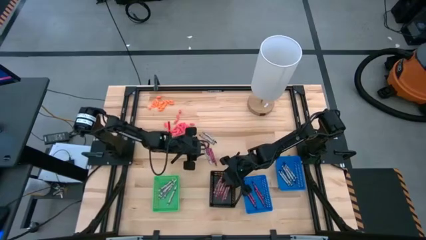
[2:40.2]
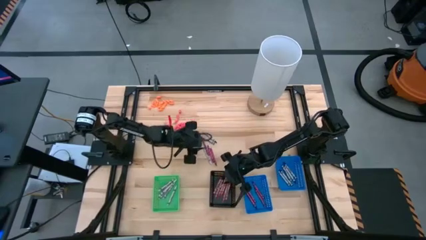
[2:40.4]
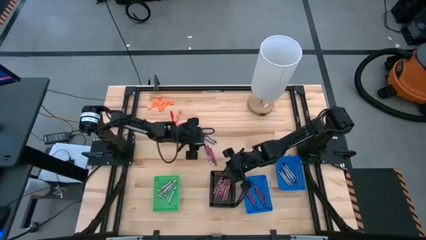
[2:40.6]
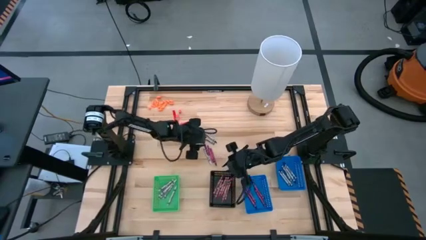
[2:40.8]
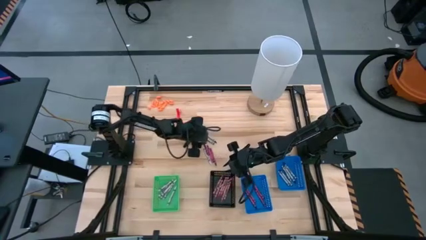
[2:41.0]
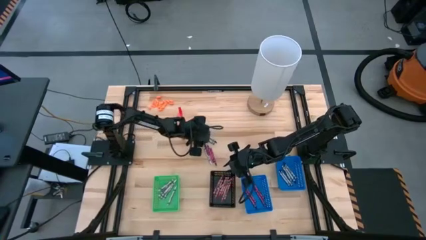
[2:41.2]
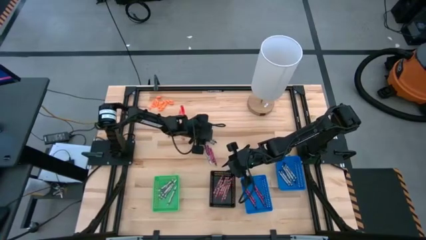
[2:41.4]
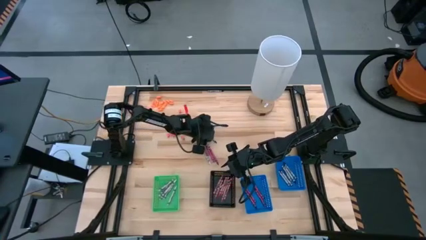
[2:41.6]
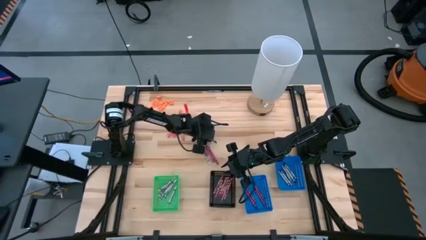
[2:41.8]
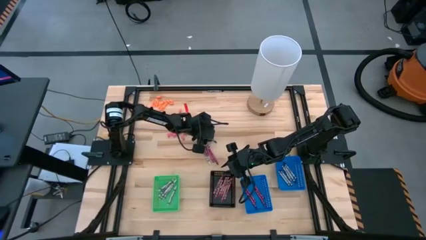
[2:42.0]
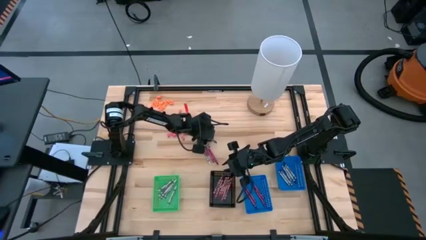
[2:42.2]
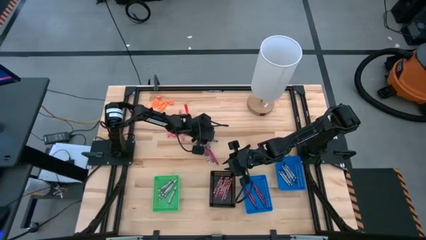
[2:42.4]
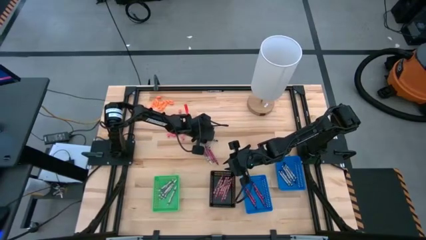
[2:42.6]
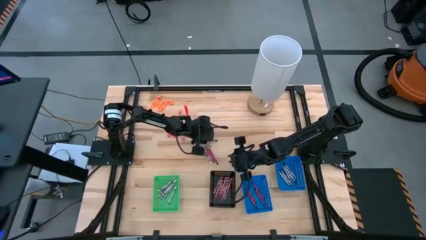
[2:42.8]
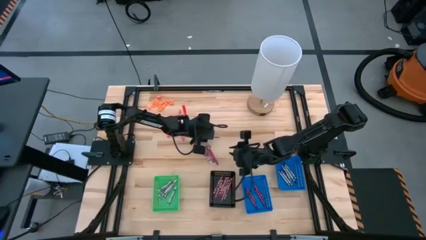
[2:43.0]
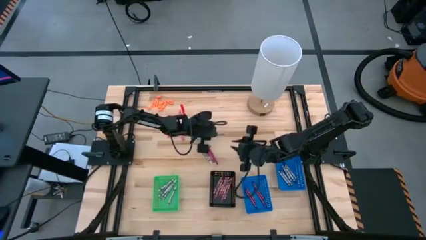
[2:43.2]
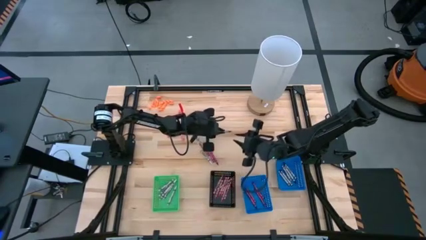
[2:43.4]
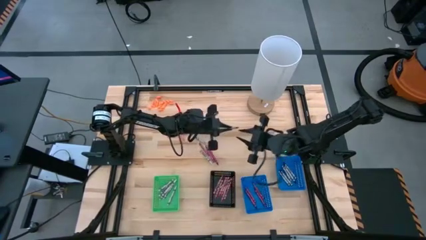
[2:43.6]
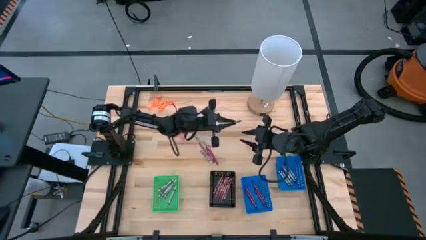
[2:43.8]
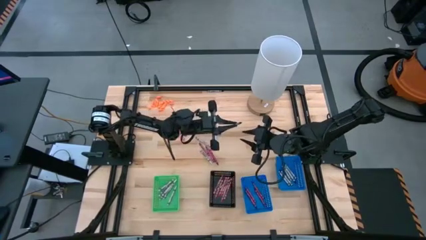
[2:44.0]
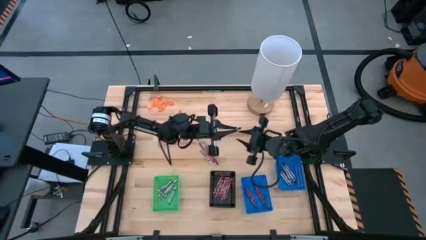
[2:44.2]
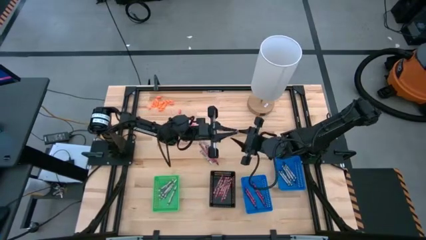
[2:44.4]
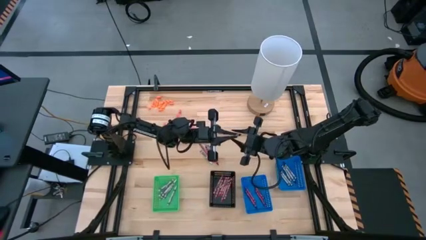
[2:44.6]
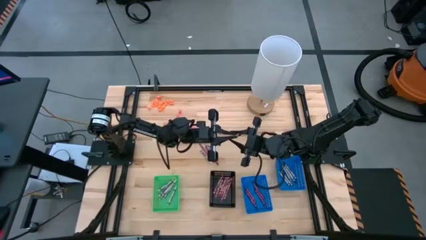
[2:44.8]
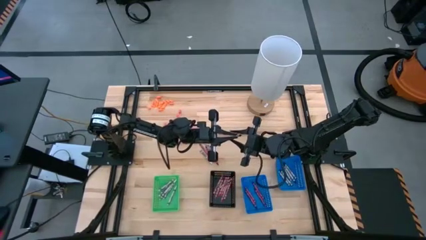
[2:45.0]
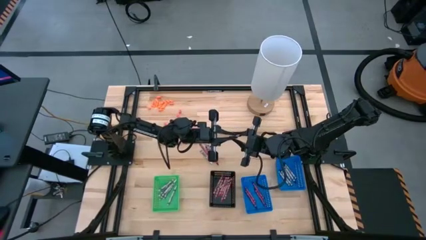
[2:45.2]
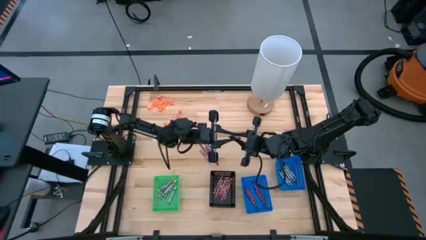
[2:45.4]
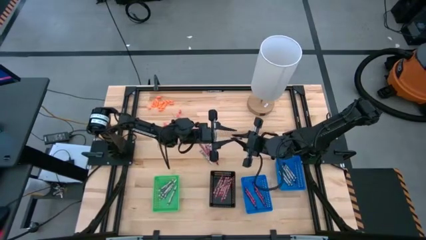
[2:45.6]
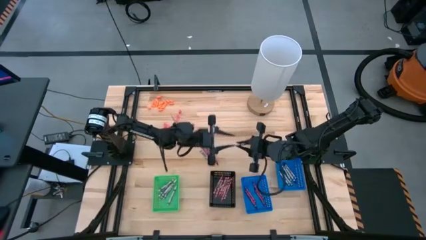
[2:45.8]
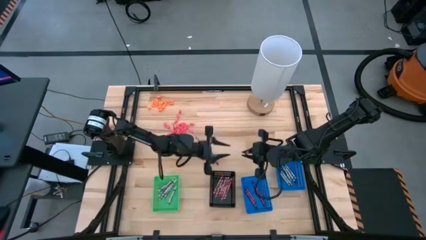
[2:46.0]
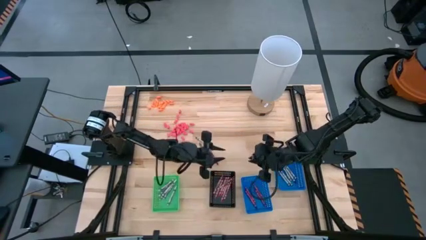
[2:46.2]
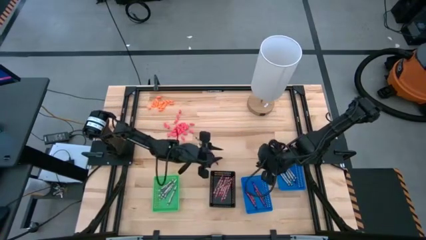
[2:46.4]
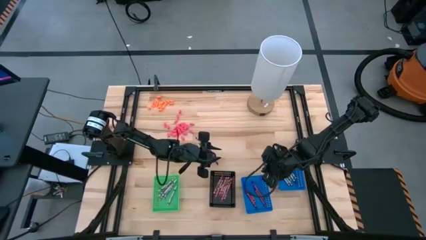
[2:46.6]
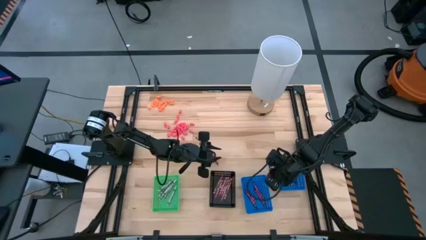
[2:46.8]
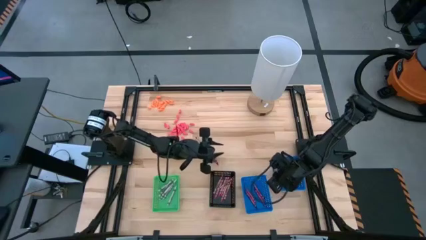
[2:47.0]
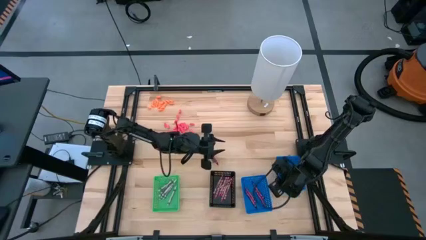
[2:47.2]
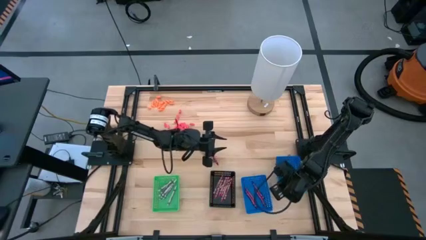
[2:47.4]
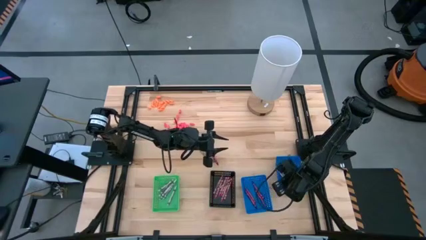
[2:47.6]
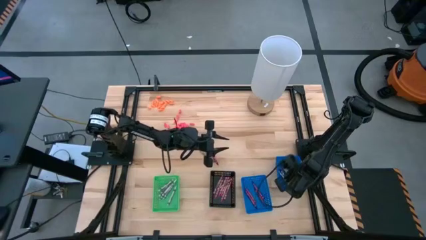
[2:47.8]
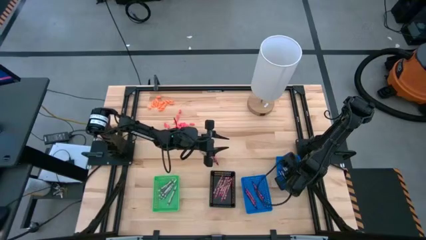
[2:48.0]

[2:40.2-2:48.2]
Task: Sort crayons
Put the black crayon into the right blue bin

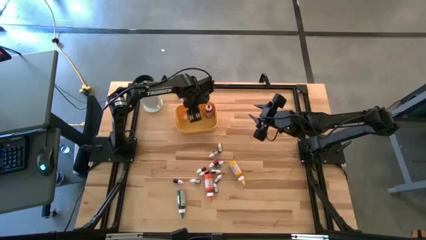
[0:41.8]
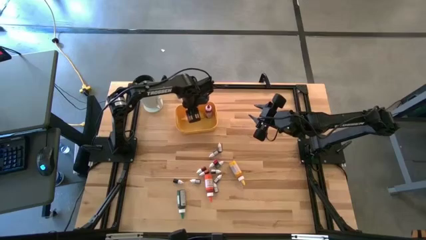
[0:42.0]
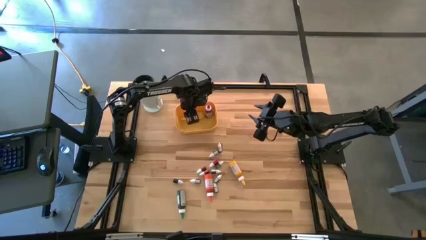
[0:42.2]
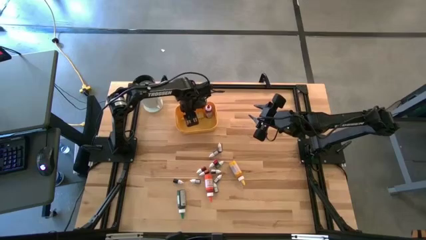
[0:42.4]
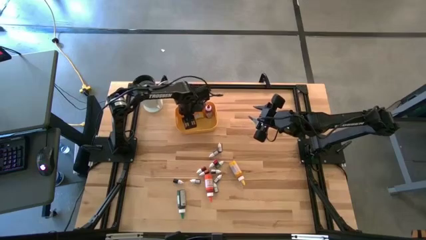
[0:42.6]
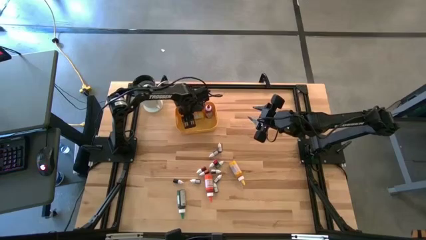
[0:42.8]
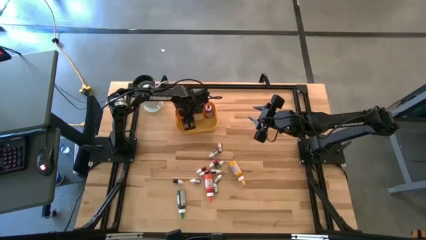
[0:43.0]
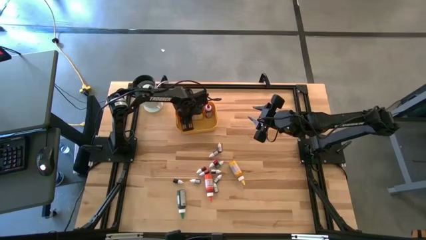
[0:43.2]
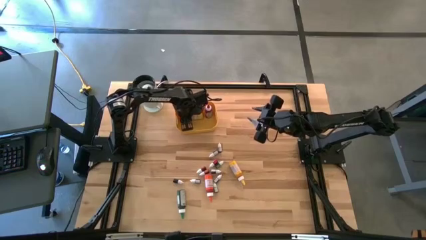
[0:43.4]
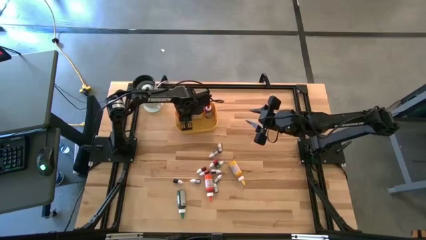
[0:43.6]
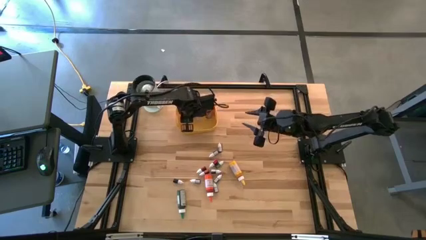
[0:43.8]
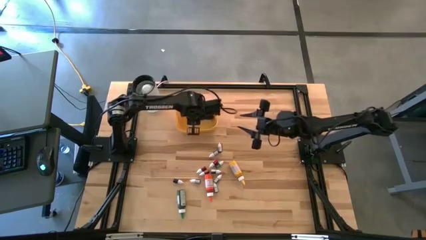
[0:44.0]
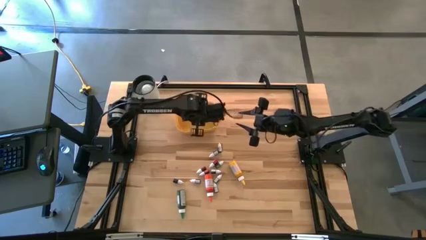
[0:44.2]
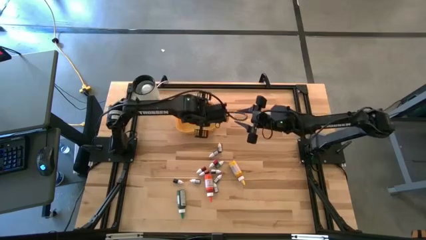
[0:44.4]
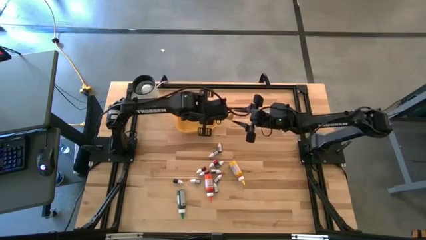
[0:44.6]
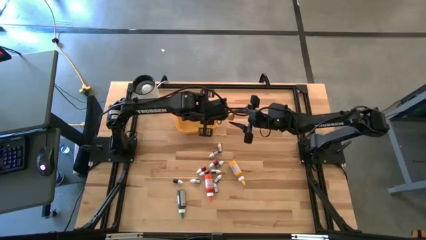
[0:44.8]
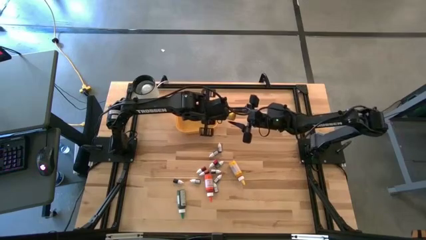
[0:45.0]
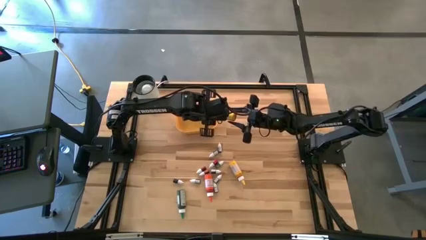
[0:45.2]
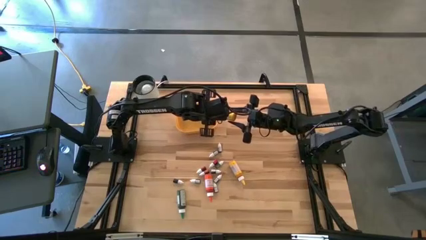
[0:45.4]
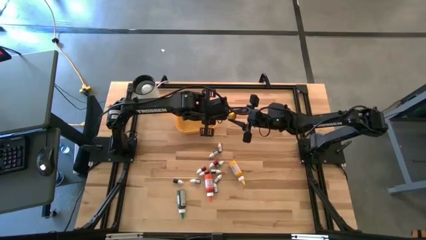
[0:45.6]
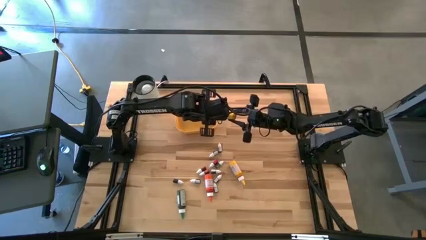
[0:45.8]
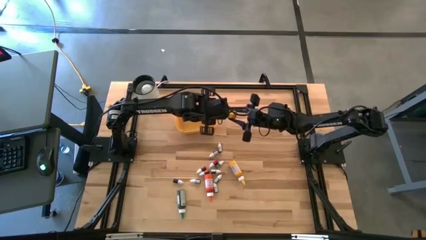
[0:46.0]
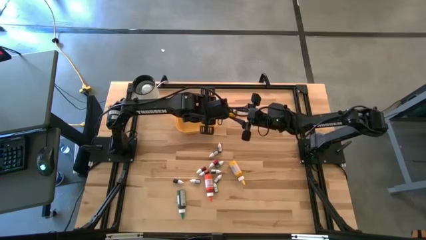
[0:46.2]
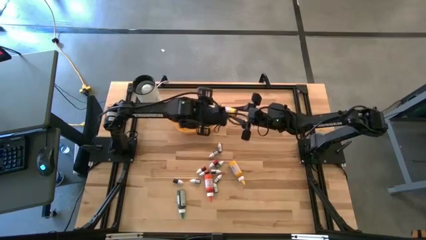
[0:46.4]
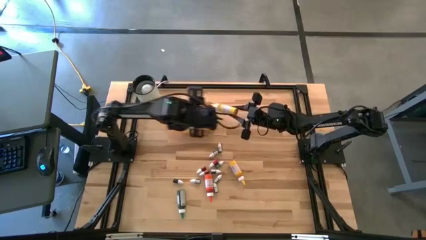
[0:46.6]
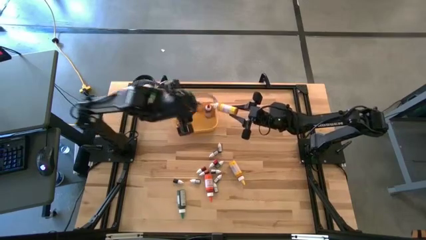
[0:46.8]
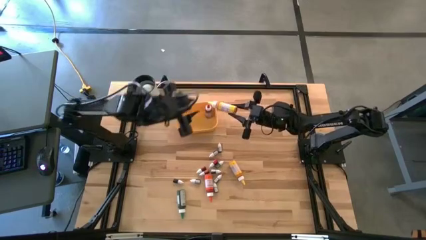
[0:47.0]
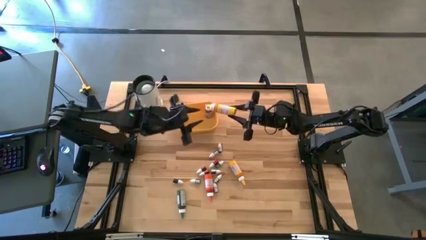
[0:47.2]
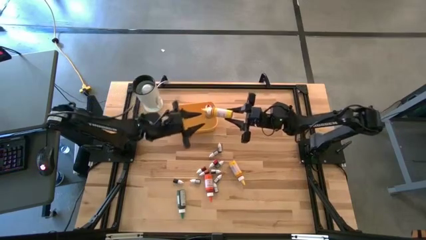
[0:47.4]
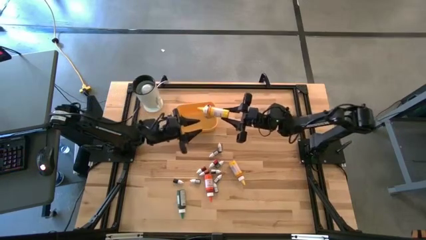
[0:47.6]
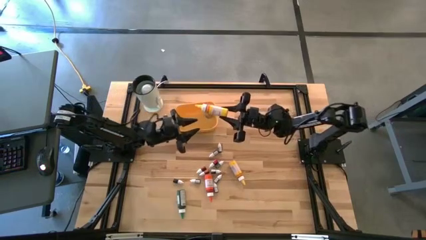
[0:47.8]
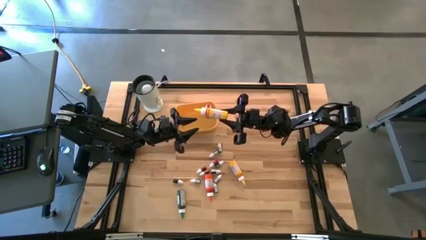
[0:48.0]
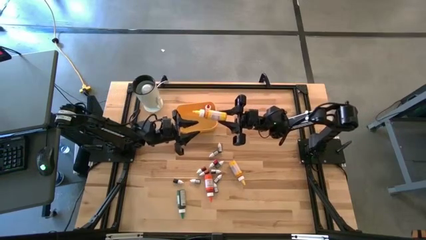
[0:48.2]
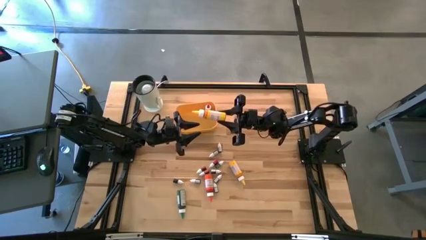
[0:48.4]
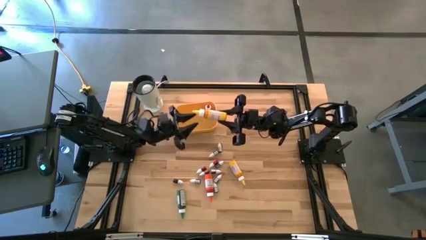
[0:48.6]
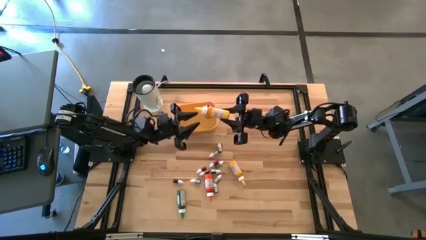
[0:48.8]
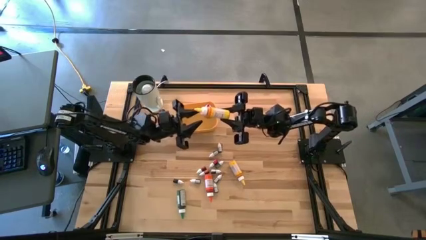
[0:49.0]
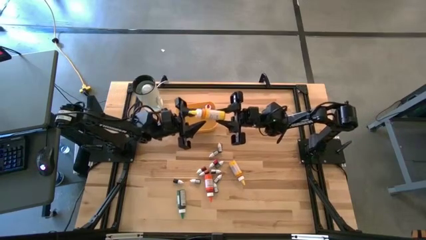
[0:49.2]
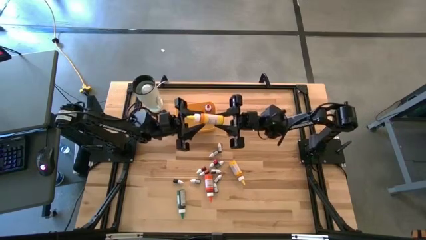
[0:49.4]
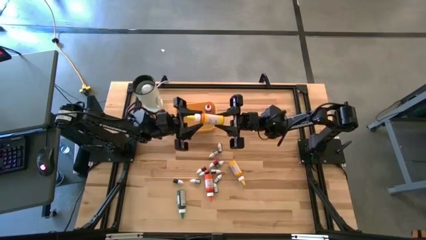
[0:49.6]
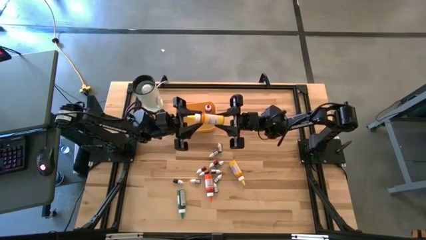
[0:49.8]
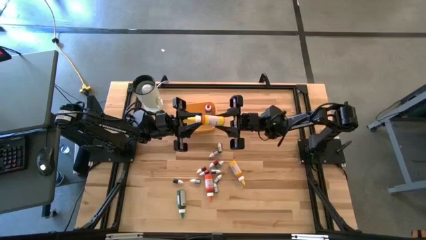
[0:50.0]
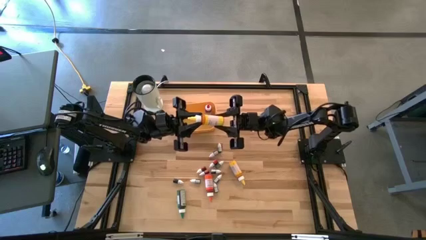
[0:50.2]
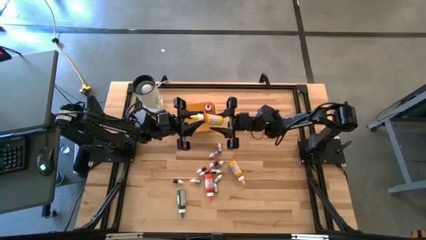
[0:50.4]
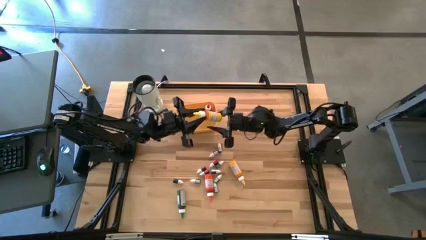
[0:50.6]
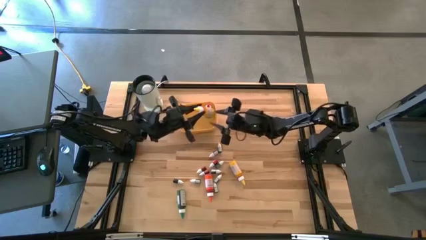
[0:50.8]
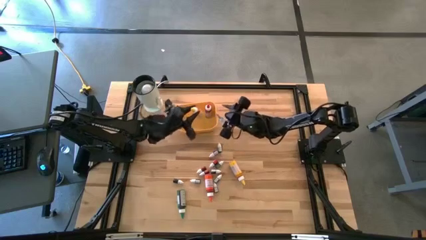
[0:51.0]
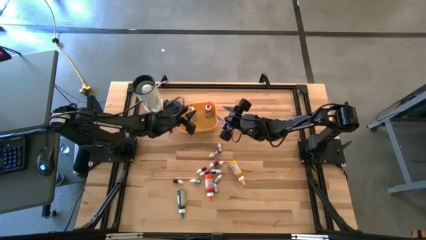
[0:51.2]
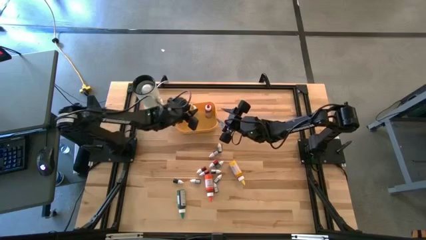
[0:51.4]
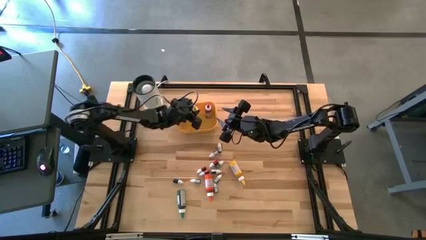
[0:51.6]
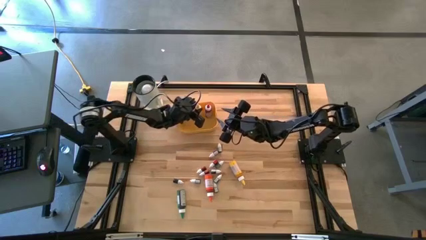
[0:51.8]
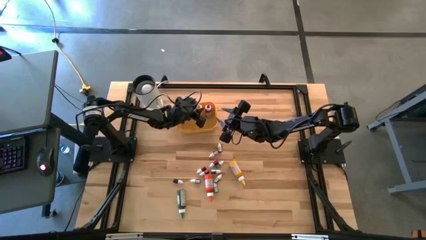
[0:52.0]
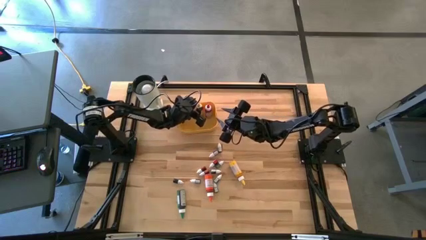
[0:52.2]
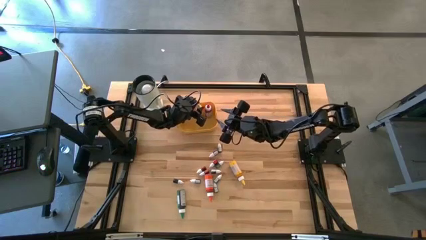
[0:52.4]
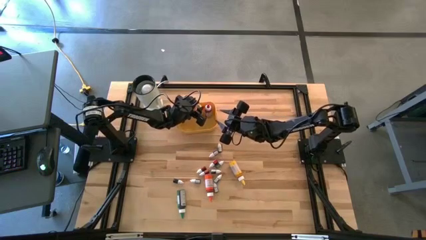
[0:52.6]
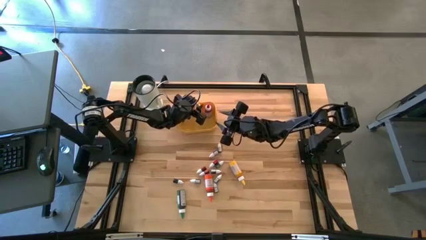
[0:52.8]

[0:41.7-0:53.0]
Task: Pick & Place food coloring
Put the large yellow food coloring bottle into the yellow bin
